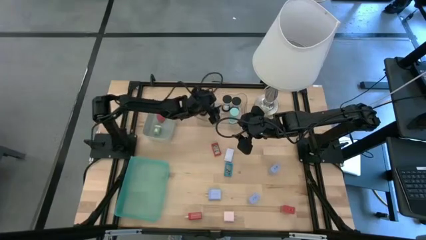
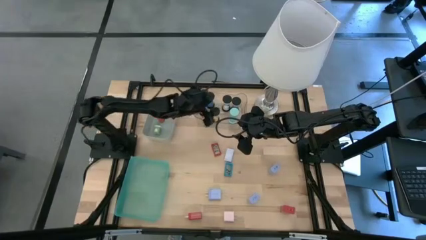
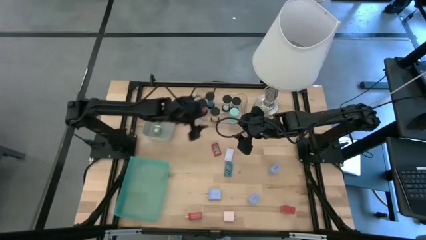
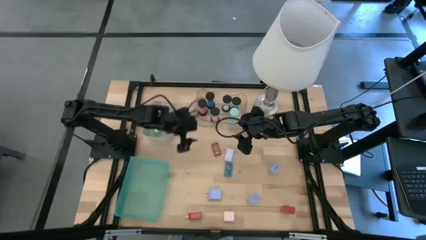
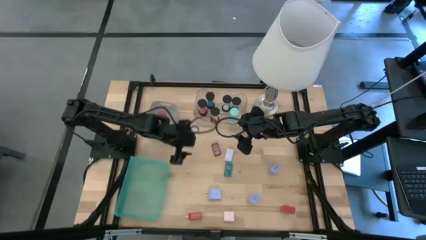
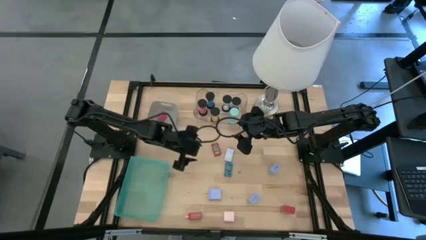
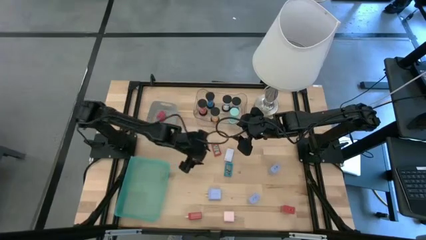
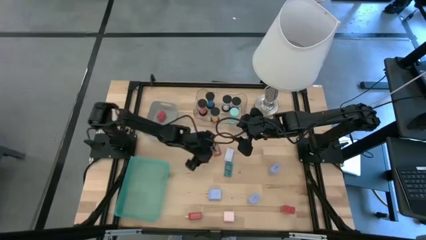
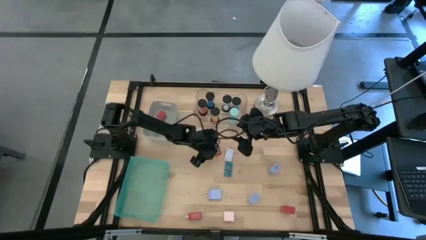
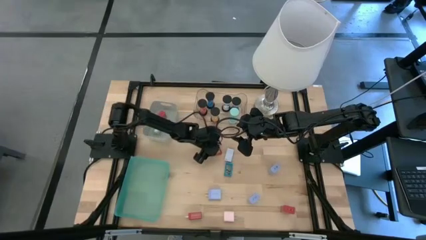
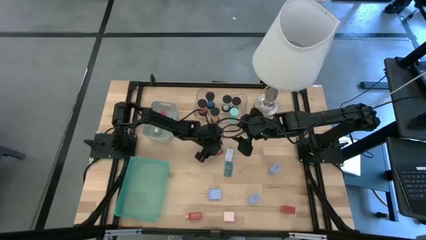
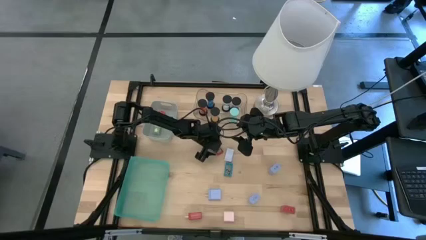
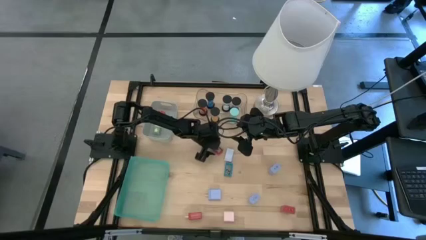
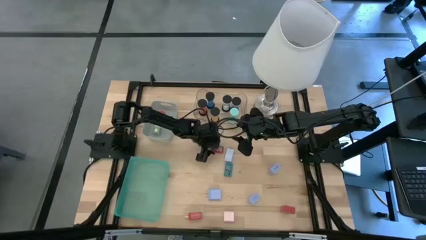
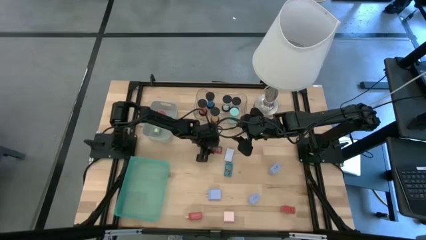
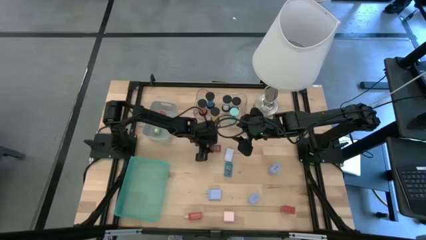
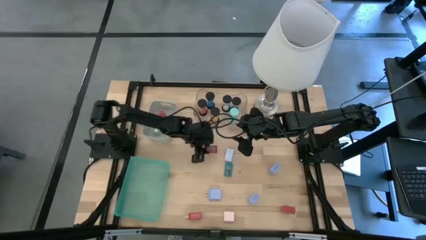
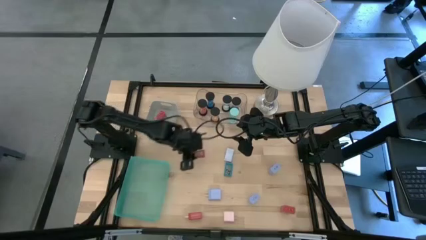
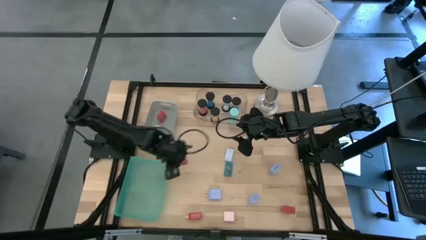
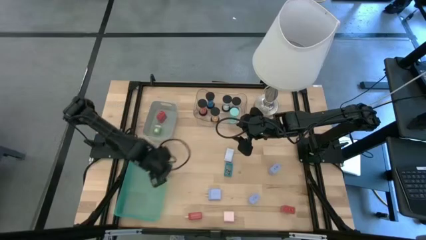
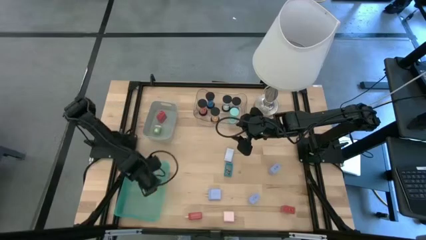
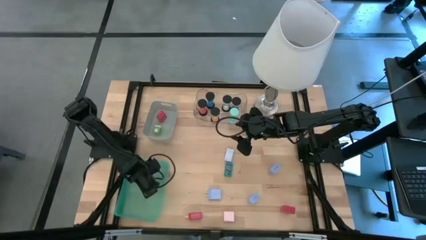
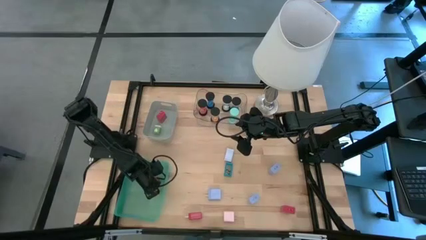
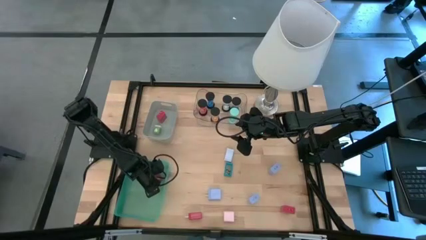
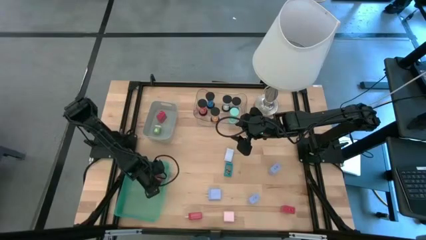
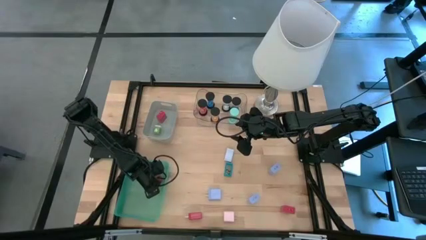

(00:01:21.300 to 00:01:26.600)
Task: Pick & Place Office items
Put the red digital clock into the green bin

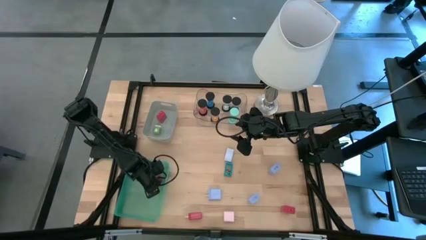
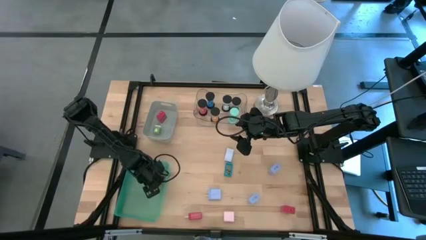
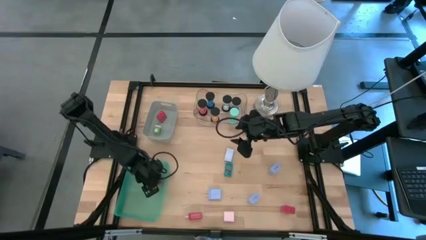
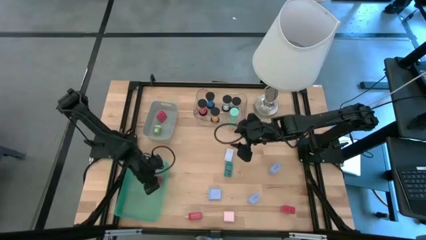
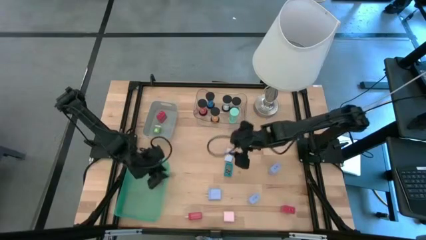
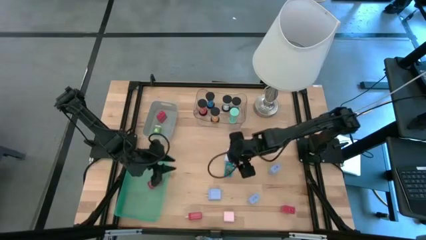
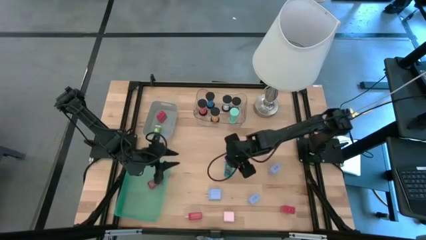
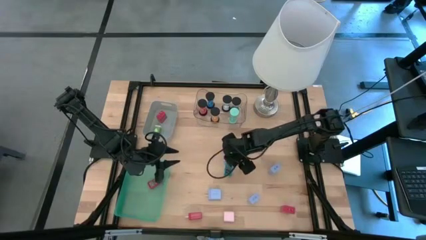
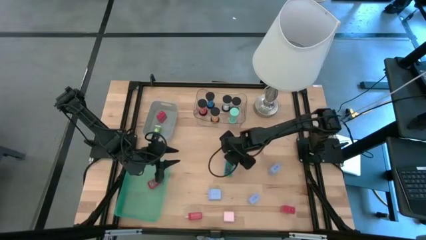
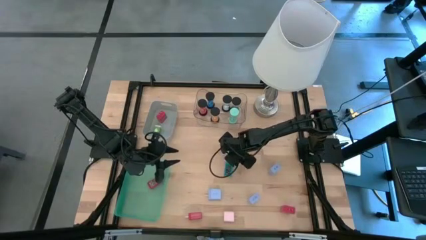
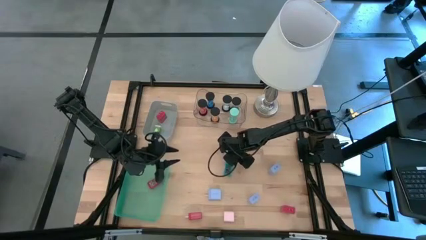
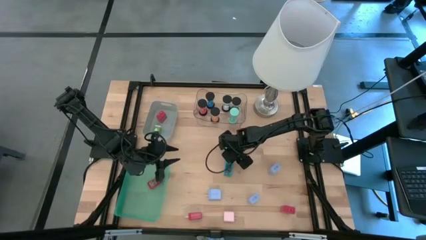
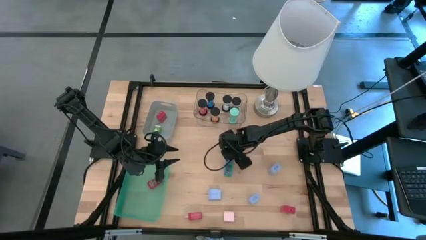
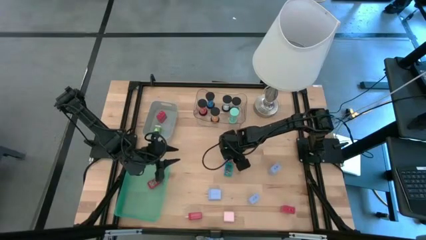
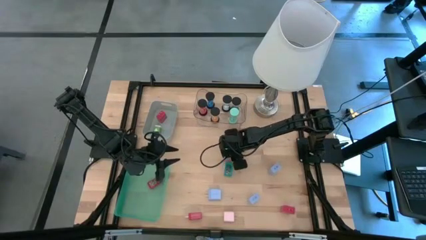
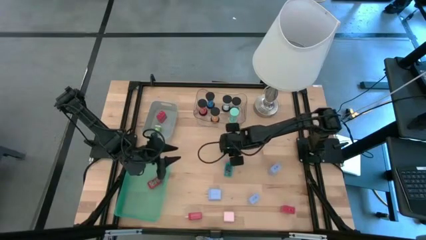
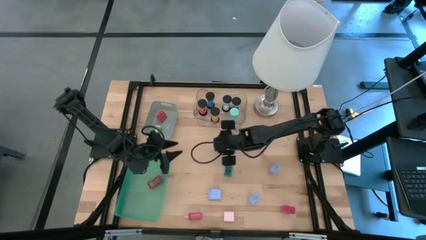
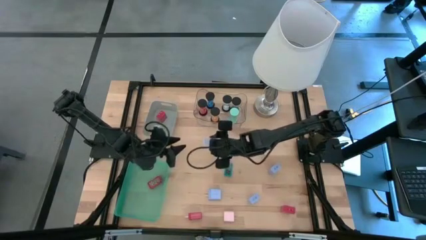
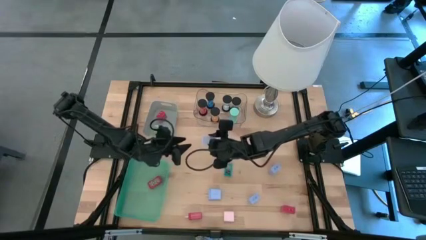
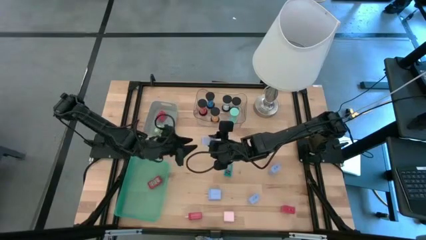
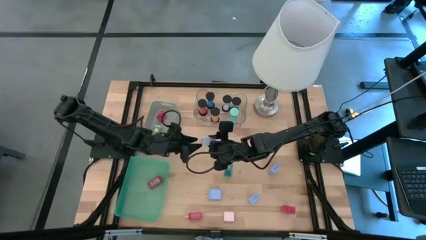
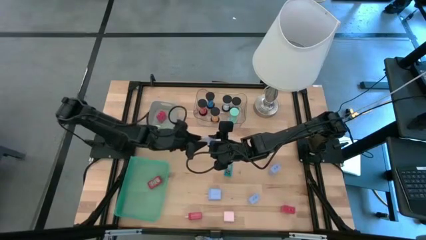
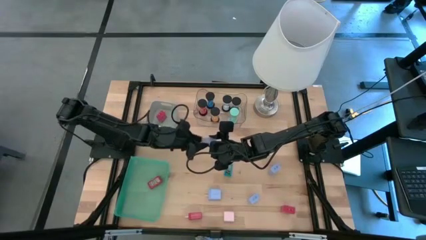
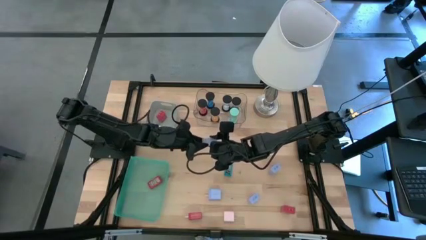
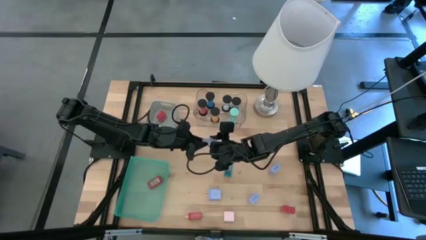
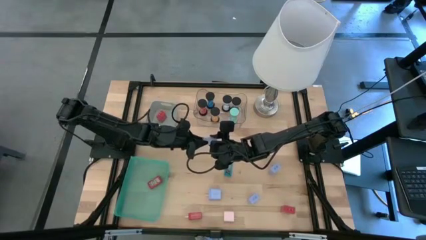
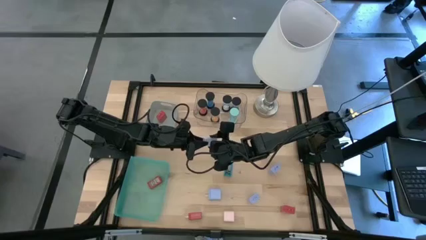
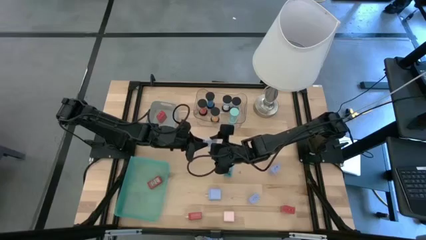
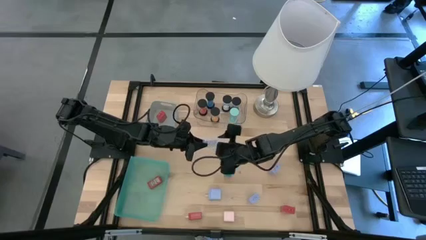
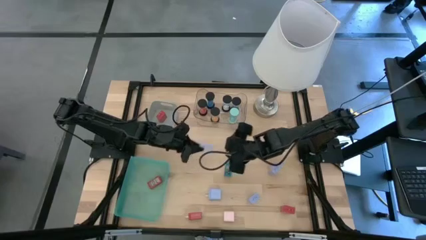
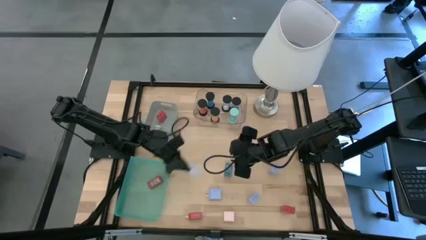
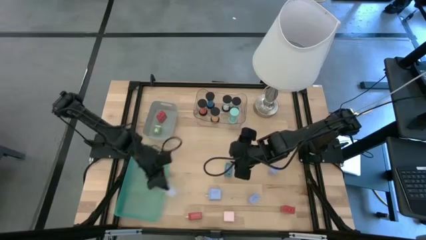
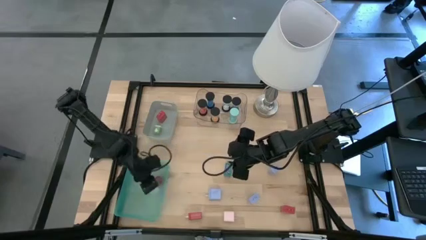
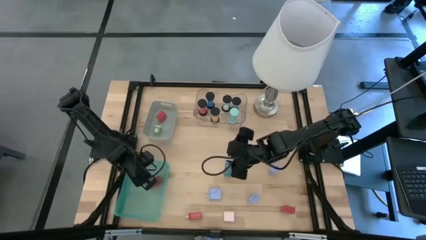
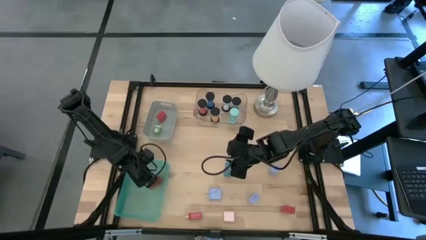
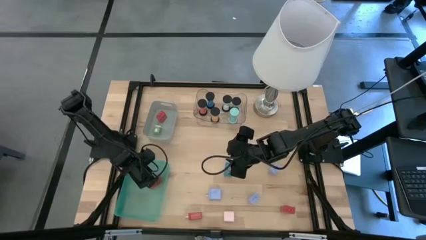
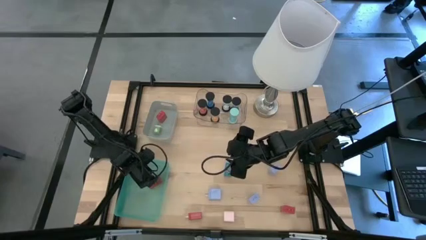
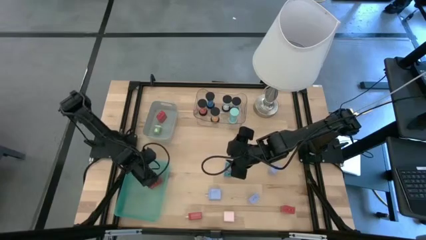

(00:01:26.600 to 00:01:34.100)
Put the light purple digital clock into the green bin

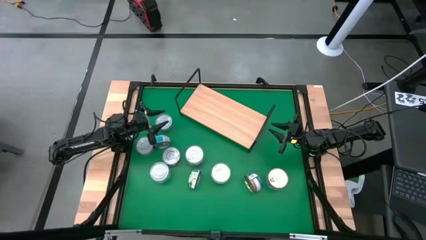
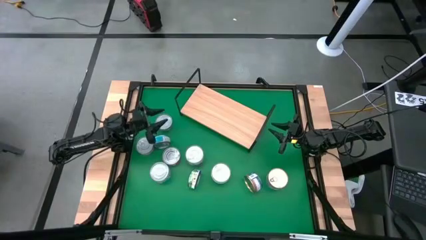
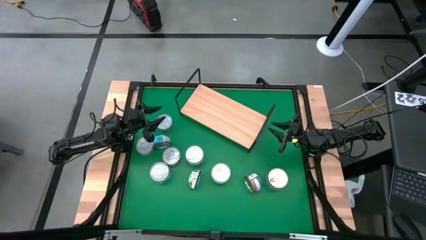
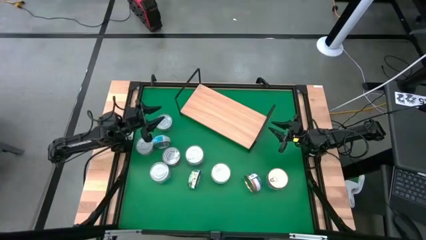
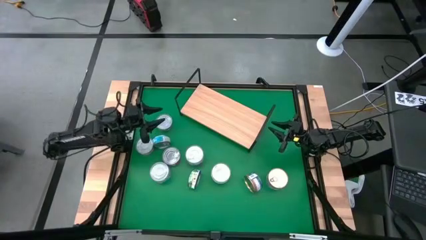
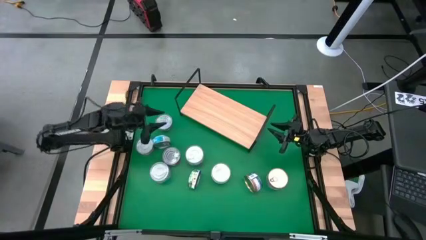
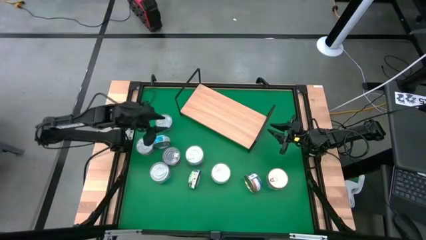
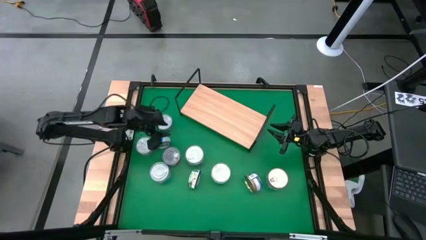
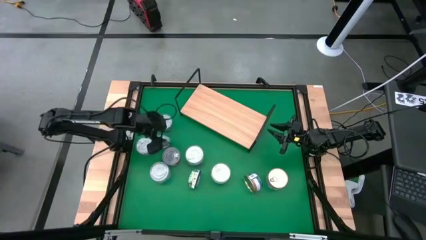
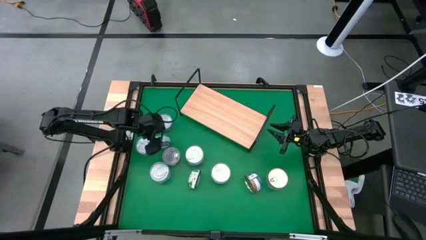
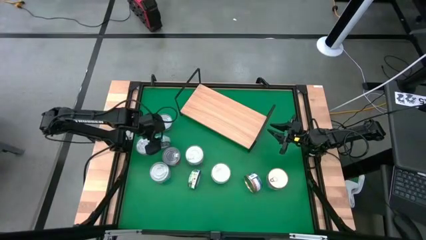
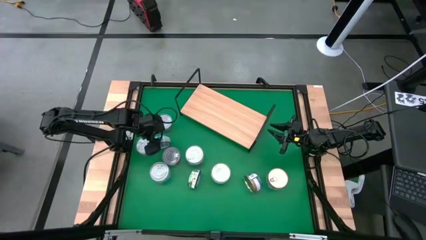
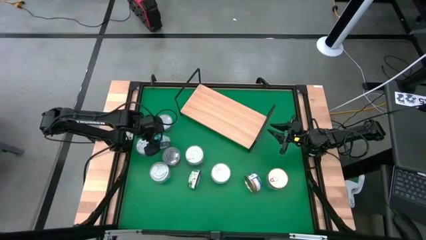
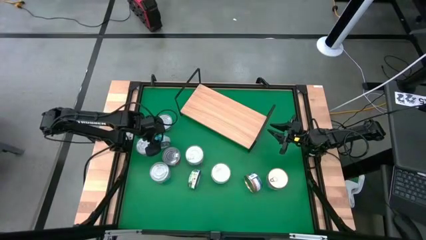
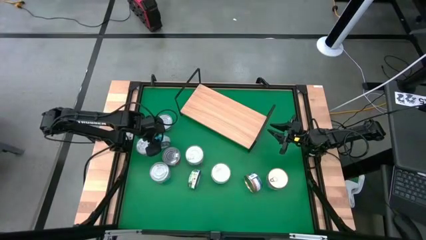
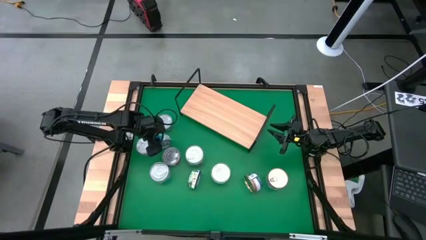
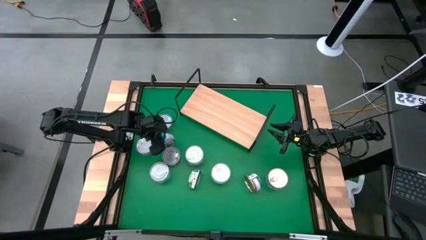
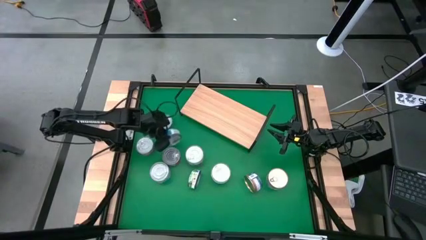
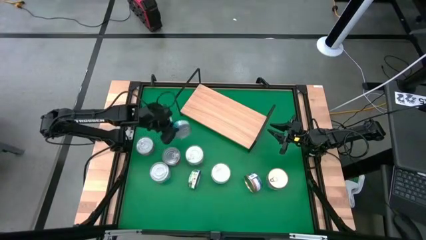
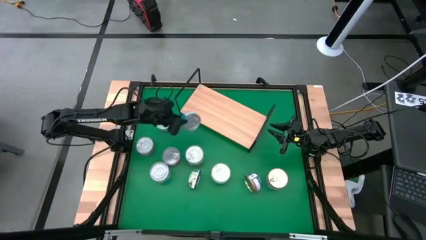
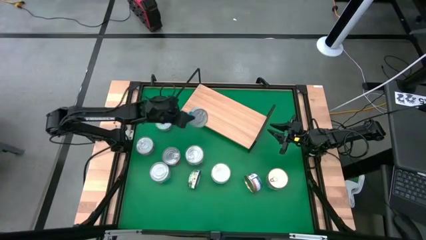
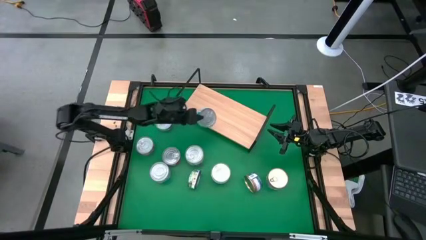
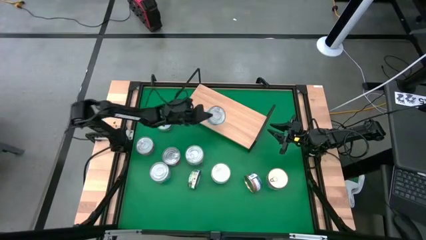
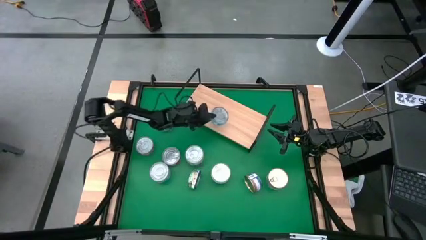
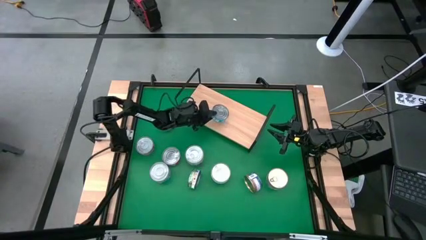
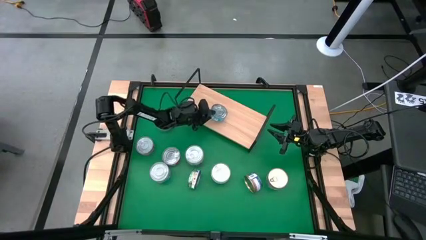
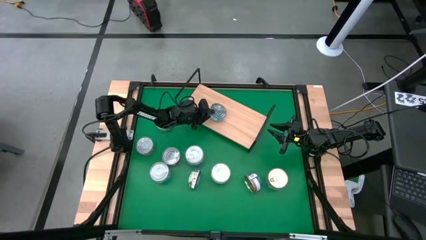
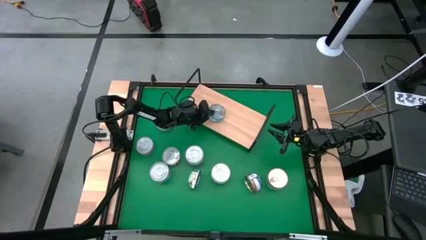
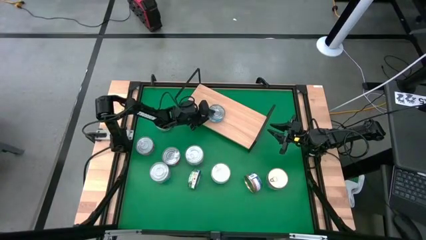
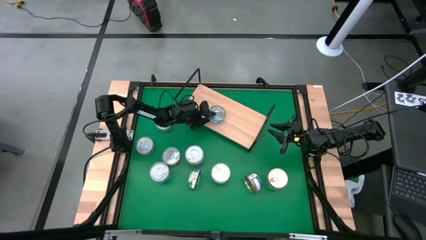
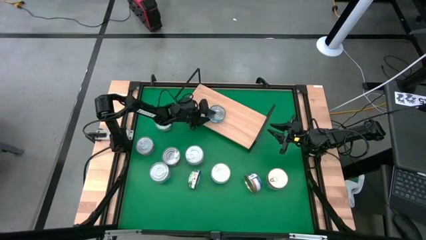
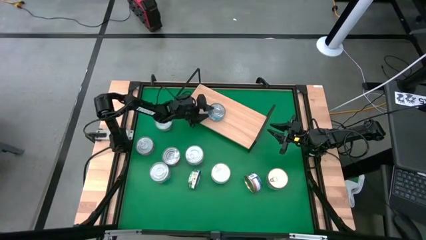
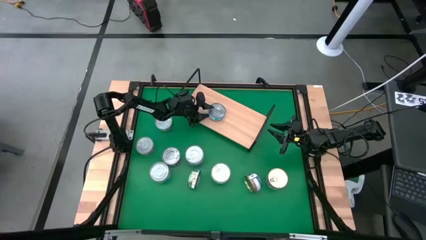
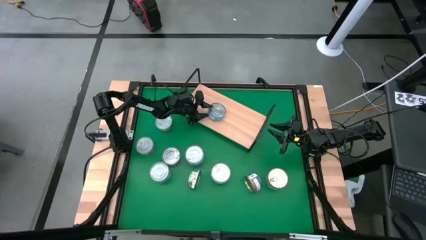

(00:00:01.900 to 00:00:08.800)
Task: Stack canned seafood by type on shelf
Put the yellow-blue tuna can on the shelf
